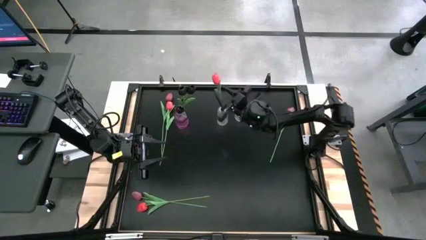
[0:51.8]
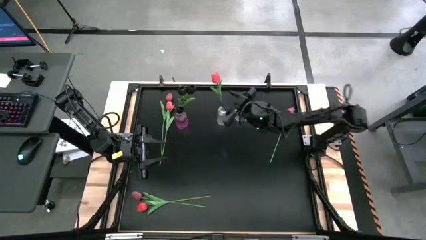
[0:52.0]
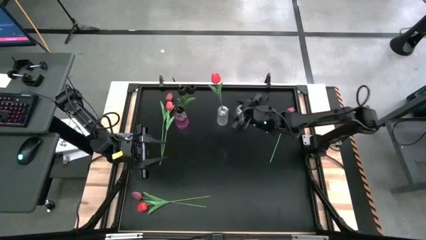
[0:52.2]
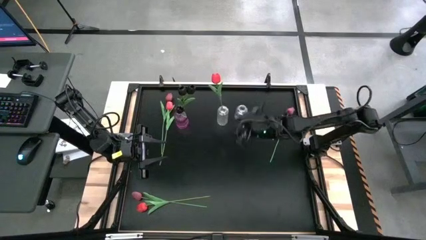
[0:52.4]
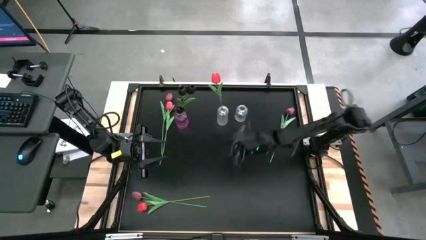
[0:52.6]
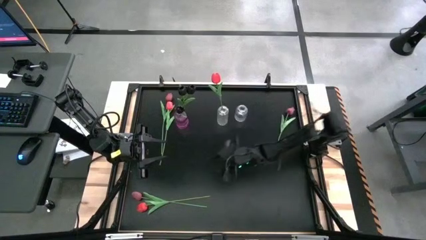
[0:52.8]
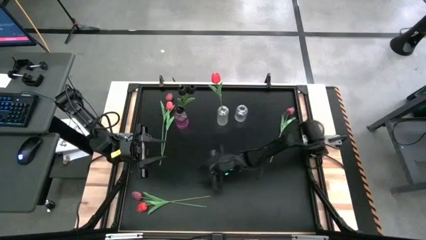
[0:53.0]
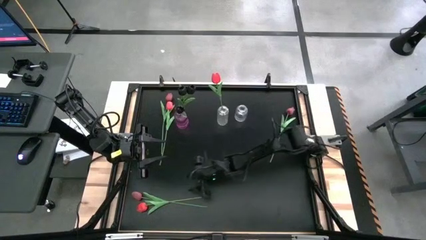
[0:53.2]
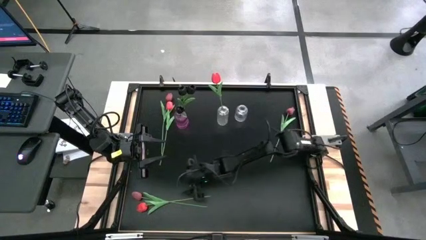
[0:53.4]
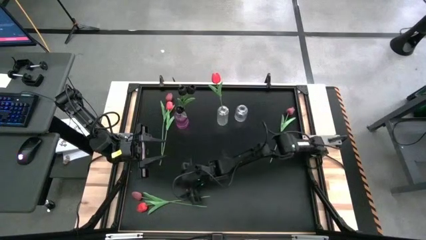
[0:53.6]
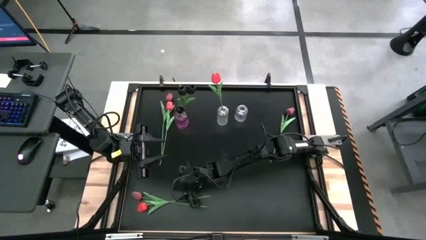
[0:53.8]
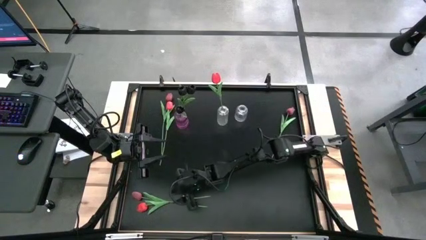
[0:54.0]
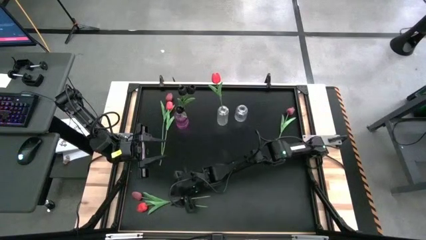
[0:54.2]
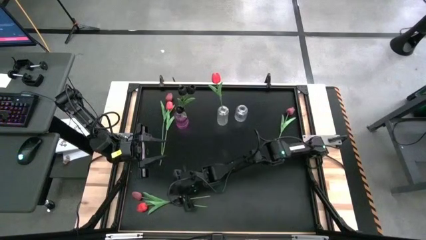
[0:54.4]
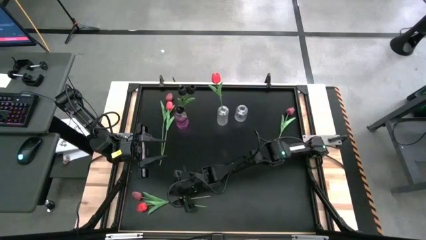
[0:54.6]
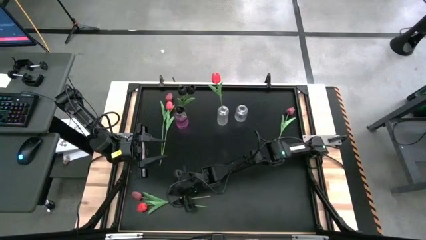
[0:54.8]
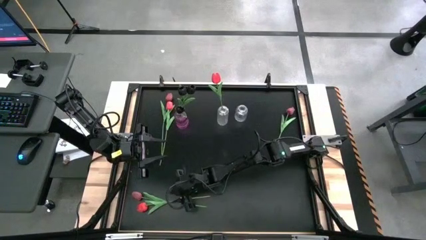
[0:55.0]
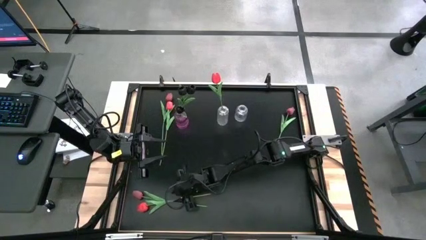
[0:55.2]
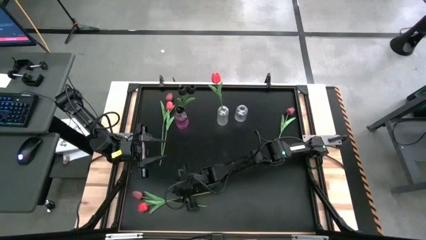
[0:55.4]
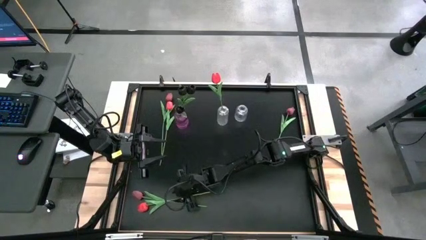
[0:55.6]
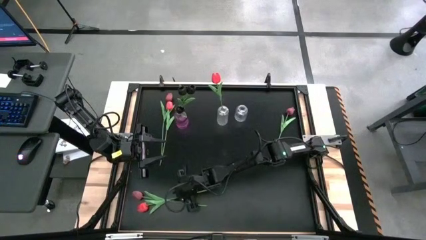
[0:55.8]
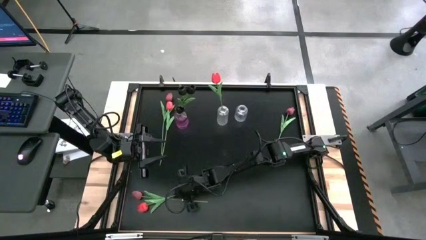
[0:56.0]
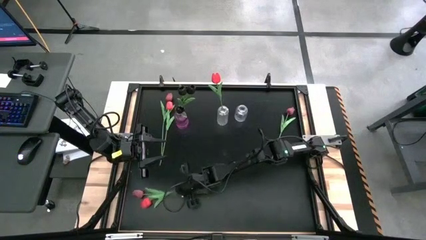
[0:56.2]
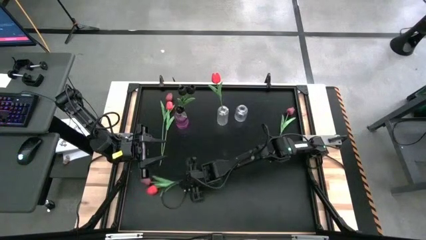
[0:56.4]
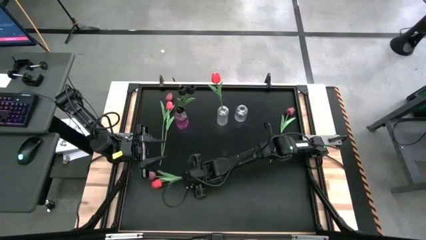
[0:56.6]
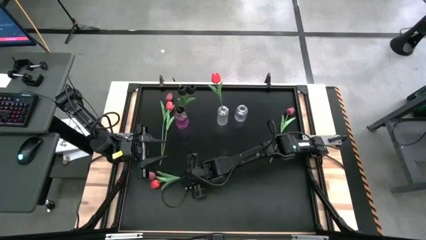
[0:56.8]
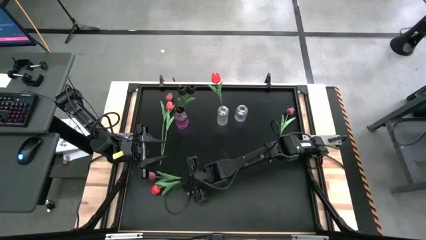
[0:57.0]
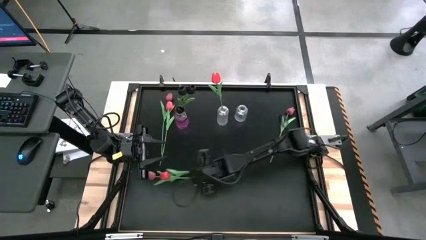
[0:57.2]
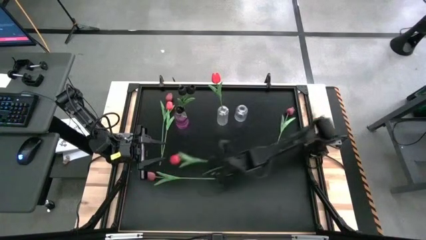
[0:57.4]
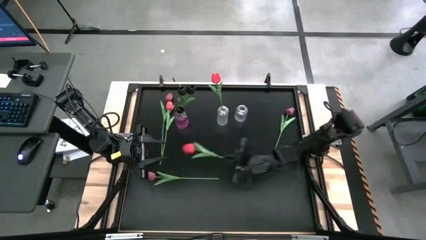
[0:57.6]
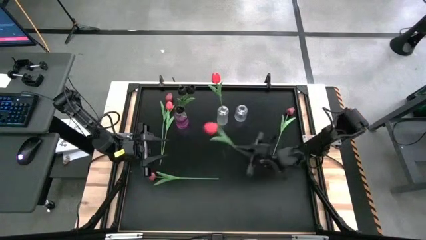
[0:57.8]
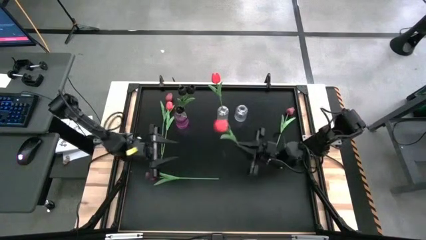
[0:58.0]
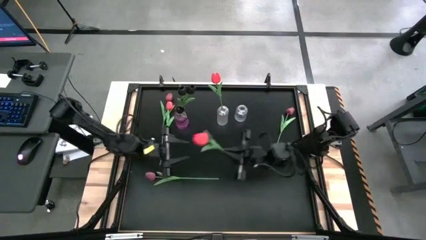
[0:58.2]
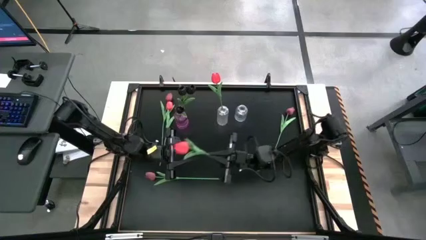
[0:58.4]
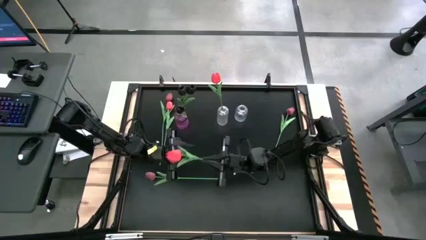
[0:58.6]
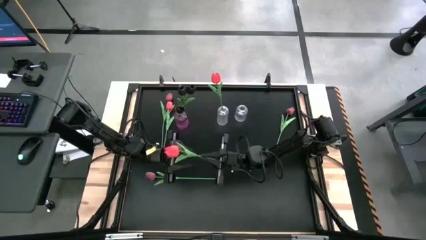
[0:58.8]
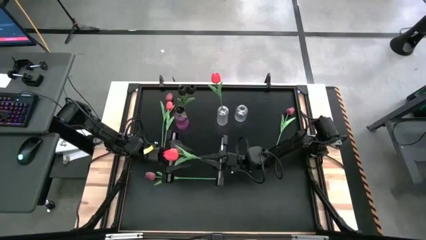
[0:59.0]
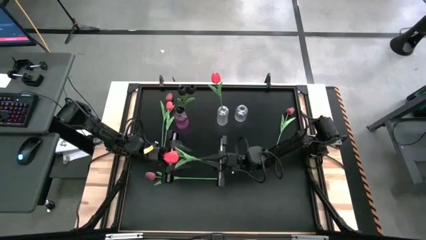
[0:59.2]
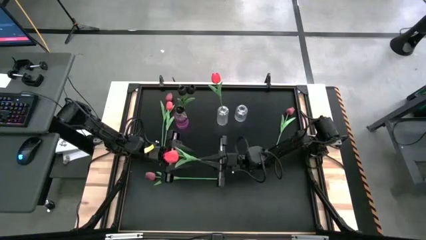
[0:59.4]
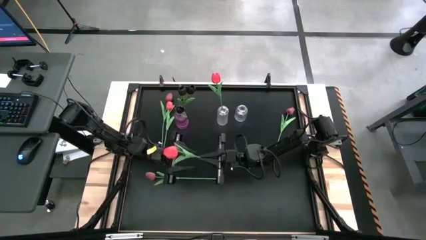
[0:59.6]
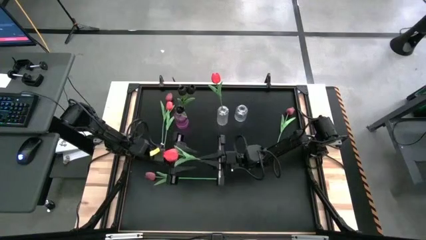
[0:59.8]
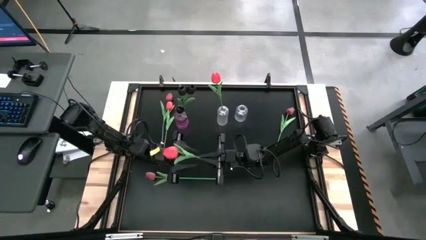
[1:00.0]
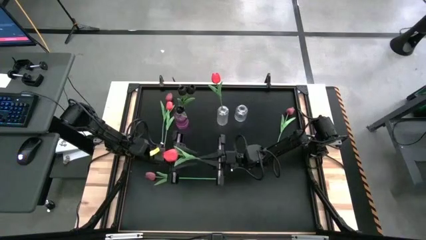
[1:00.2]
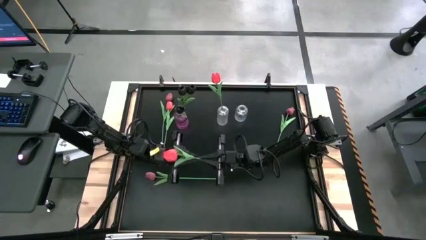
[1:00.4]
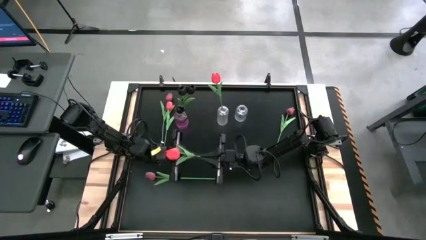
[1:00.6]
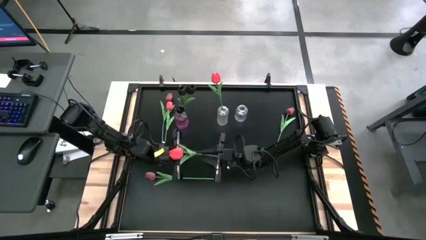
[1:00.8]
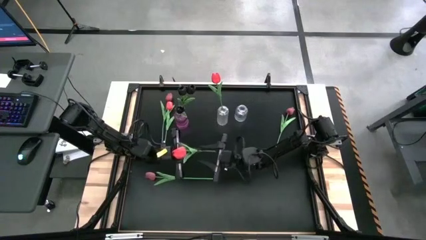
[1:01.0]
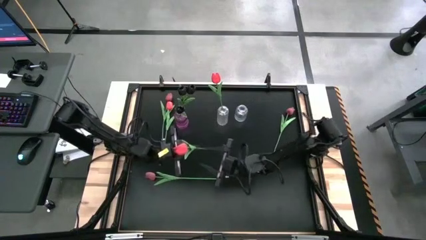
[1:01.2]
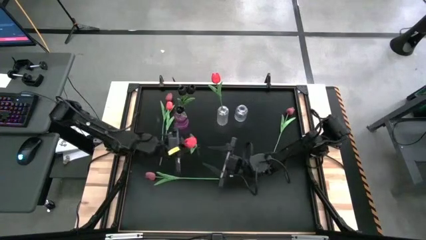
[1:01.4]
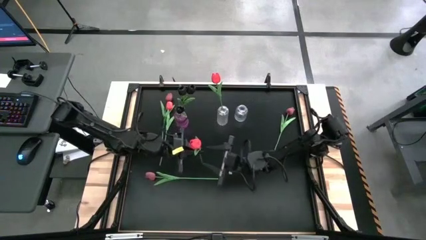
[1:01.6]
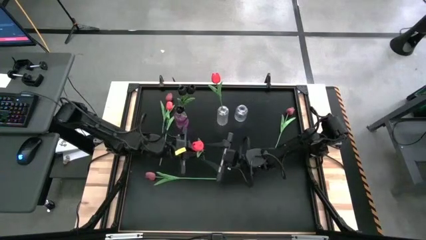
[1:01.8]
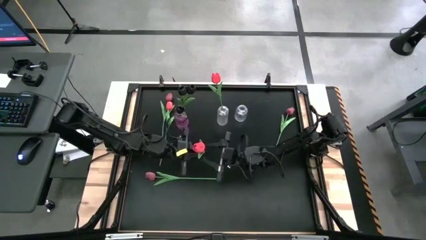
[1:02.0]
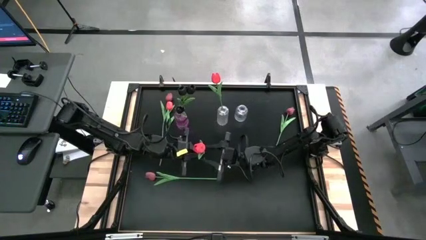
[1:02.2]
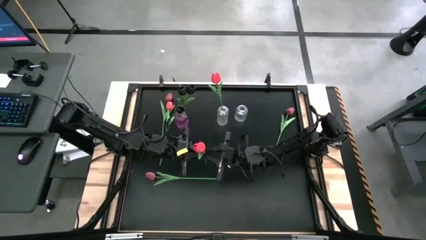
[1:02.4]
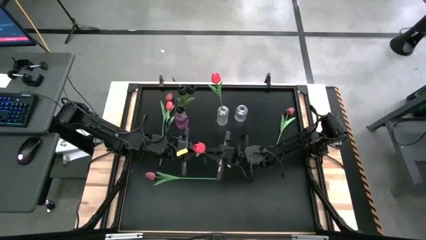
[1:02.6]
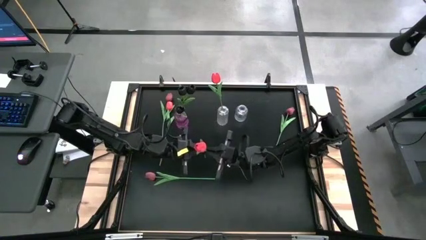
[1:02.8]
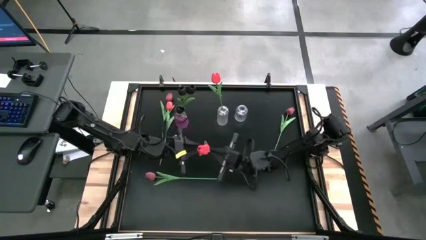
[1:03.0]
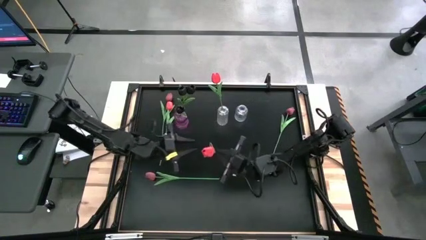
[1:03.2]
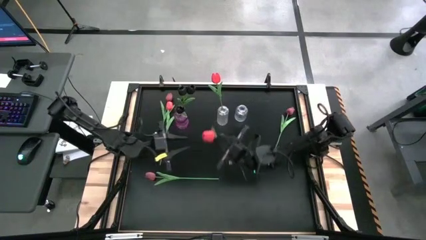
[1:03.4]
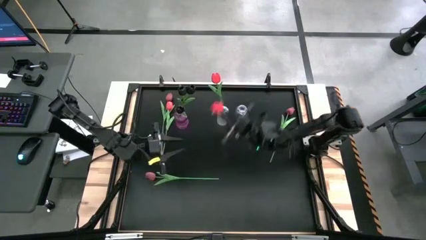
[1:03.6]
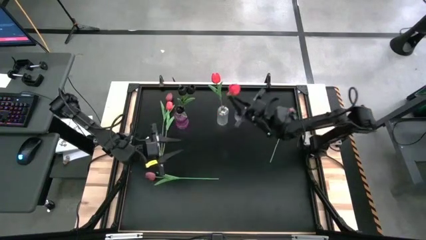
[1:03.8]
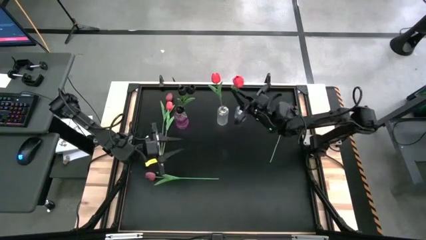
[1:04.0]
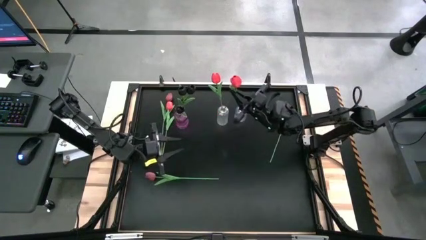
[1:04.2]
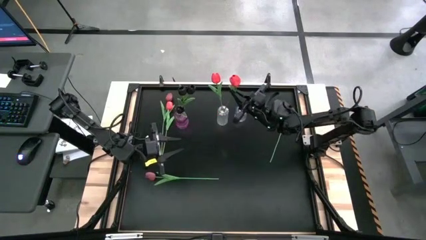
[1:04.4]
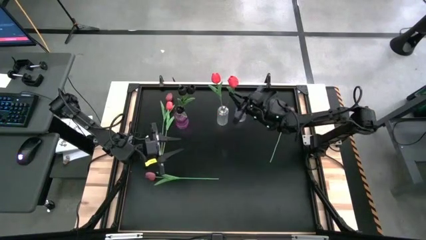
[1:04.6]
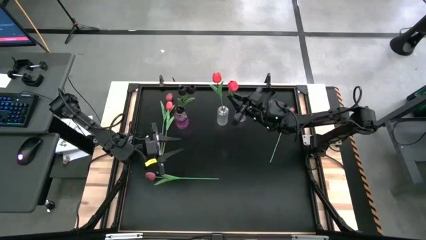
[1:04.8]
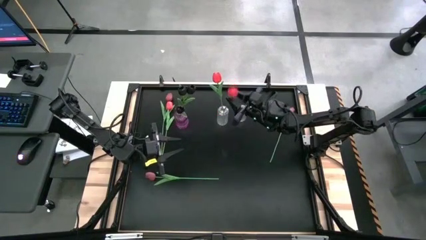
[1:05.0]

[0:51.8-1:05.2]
Task: Sort flowers into vase by color
Put the bottom pink flower into the left transparent vase
